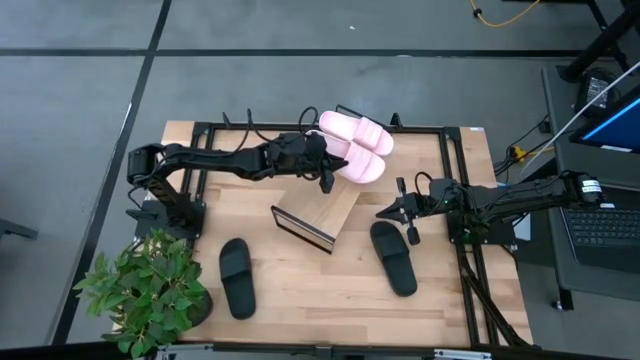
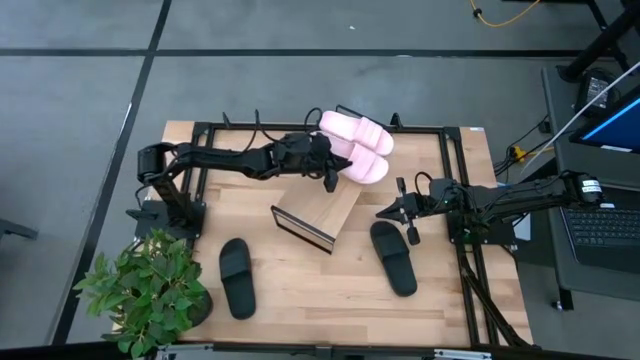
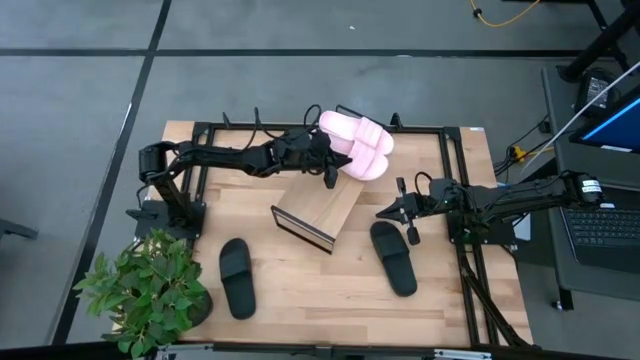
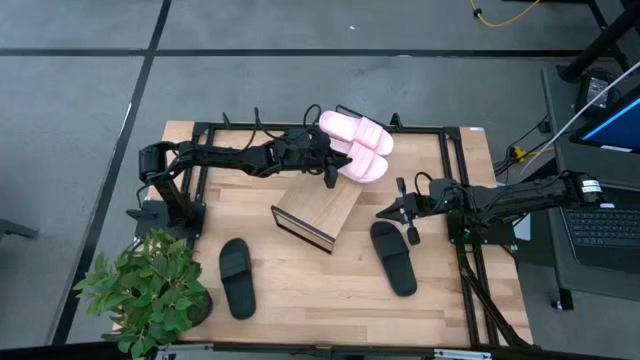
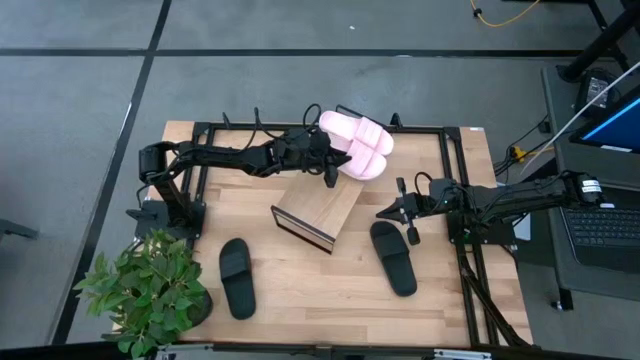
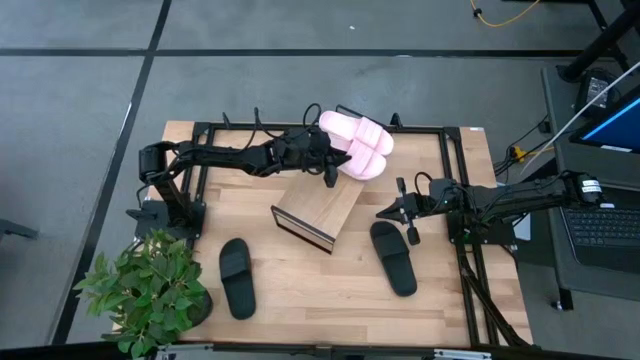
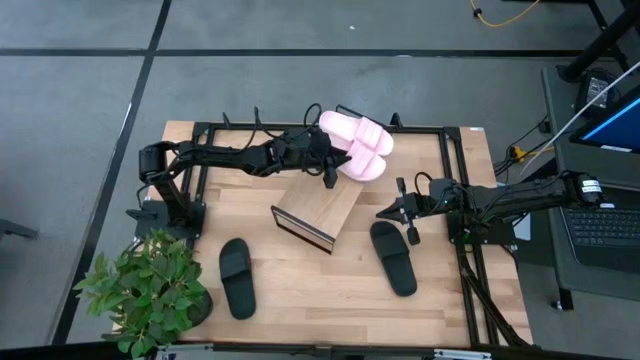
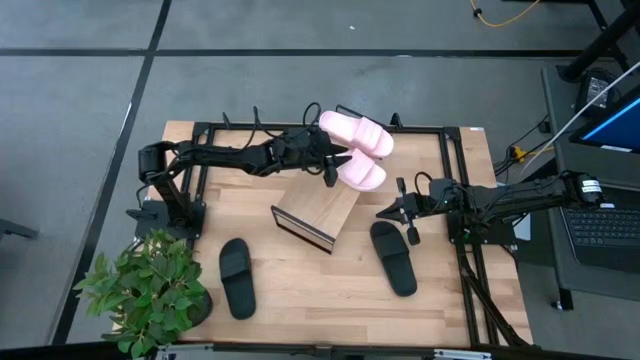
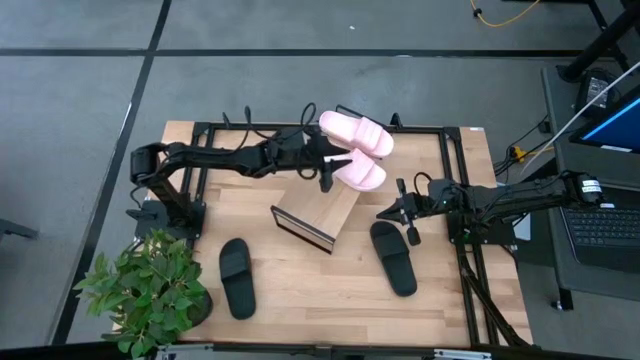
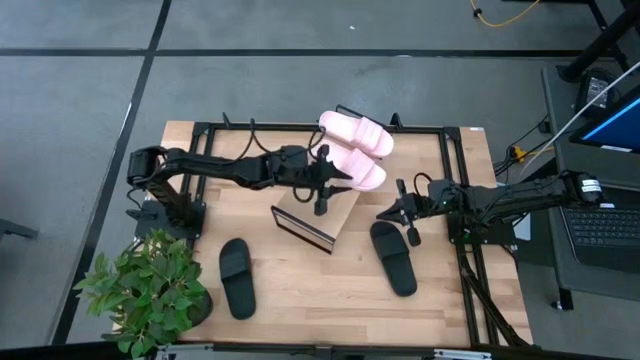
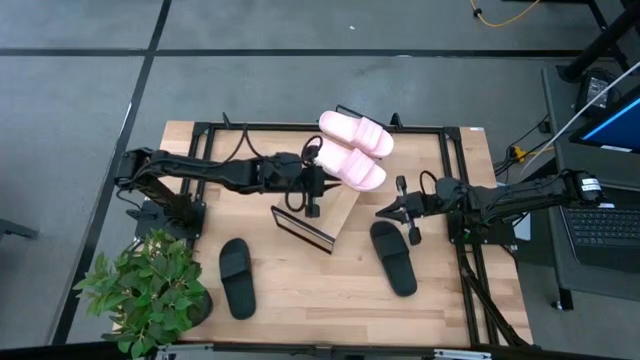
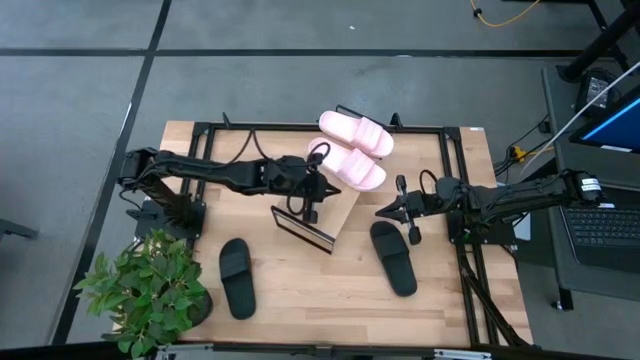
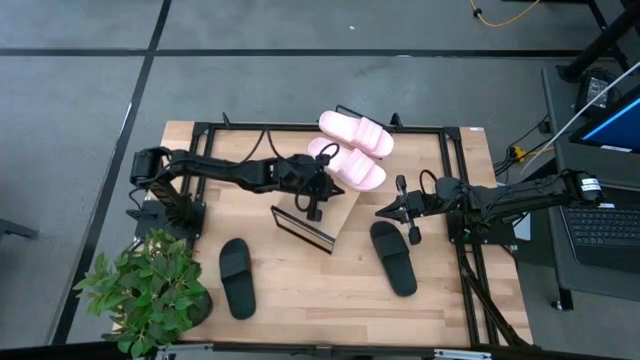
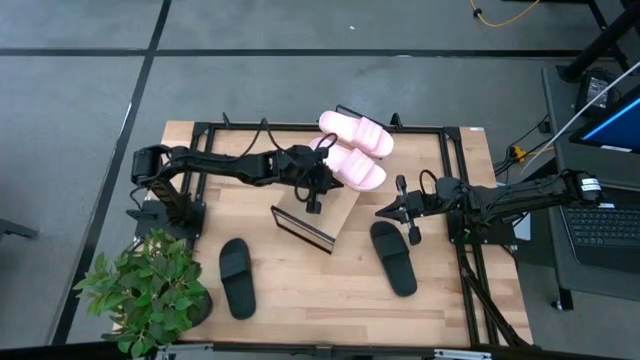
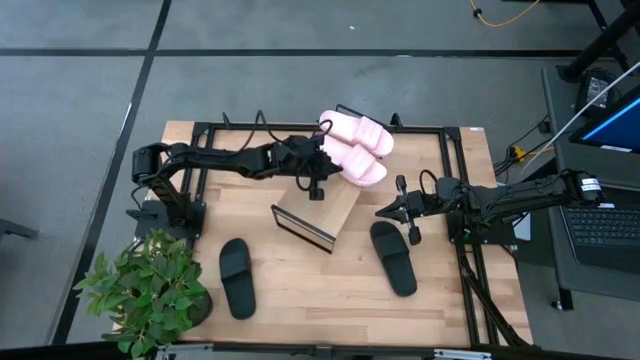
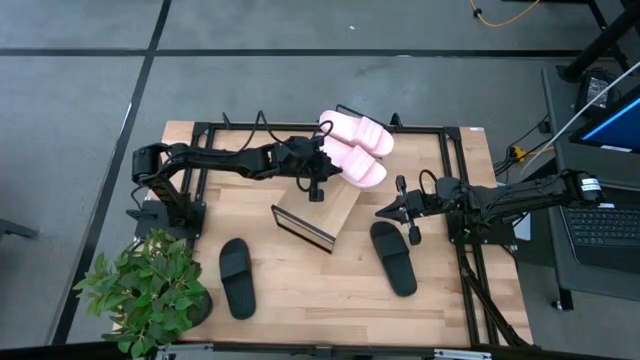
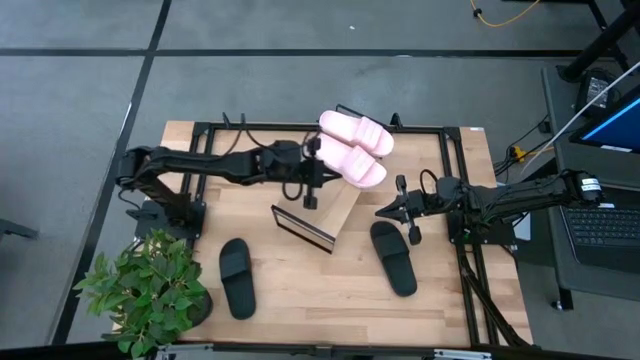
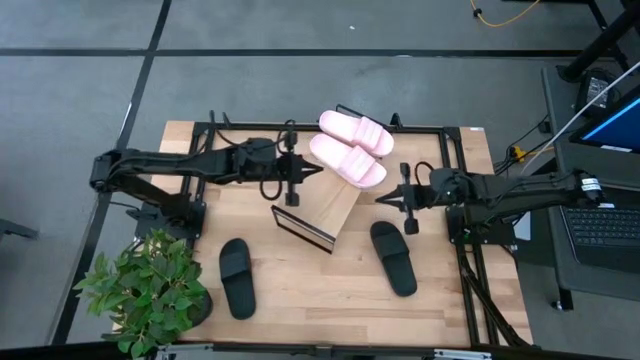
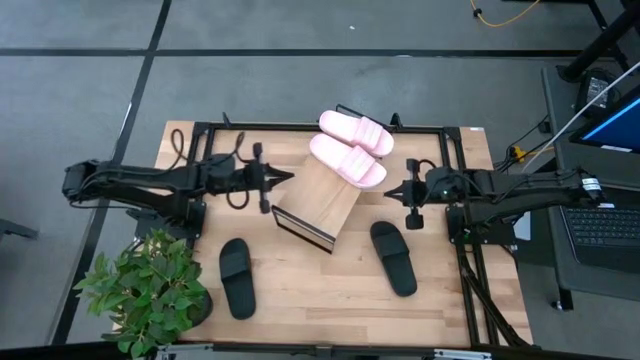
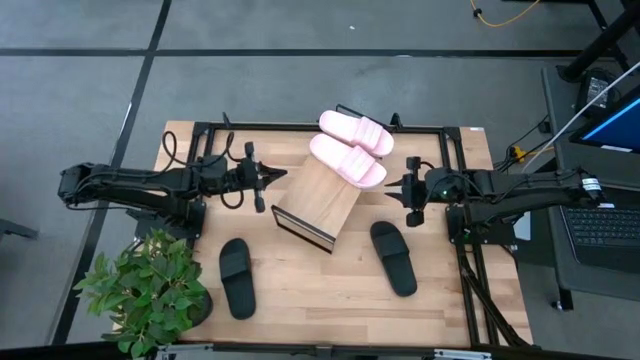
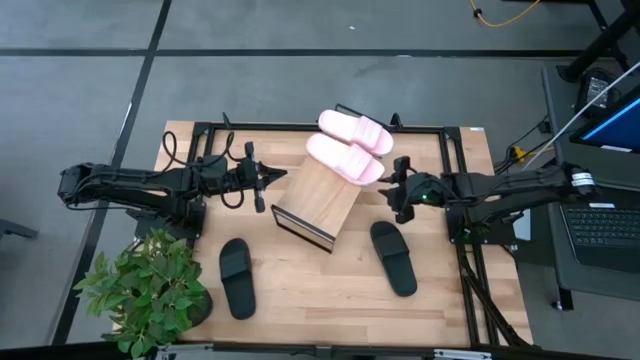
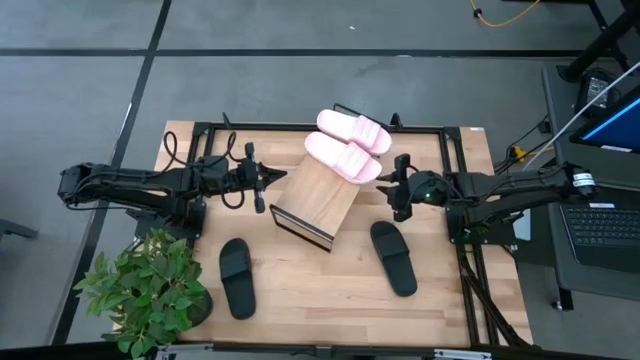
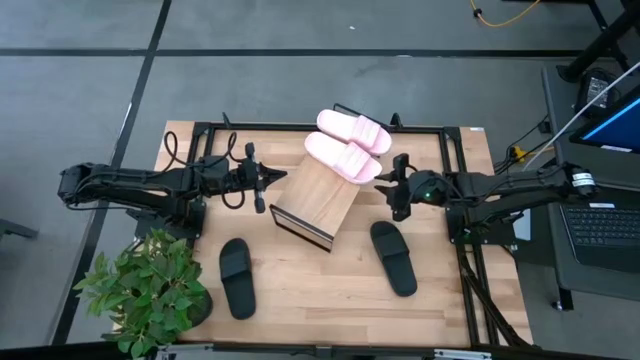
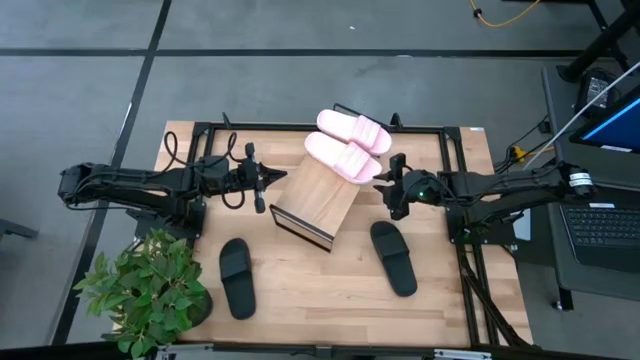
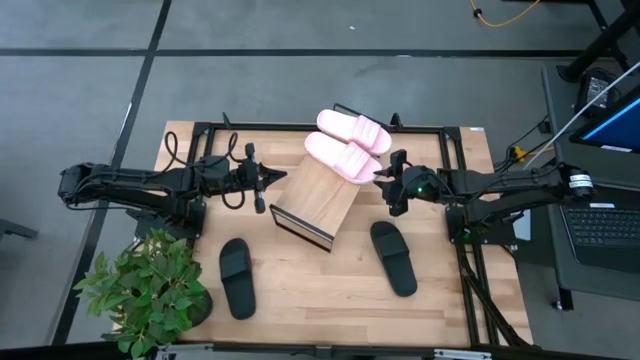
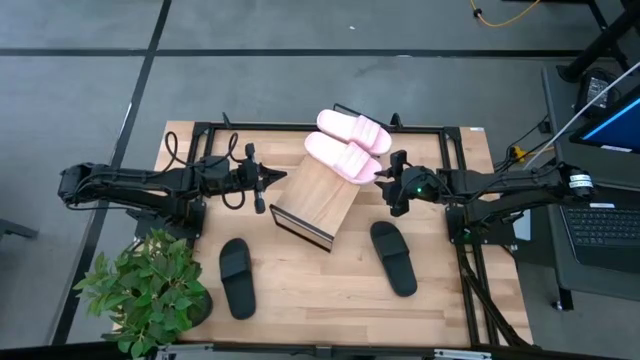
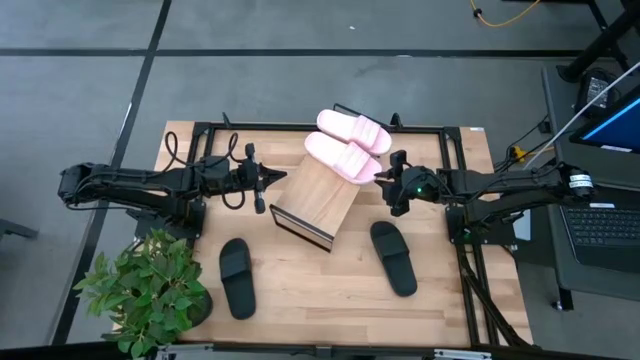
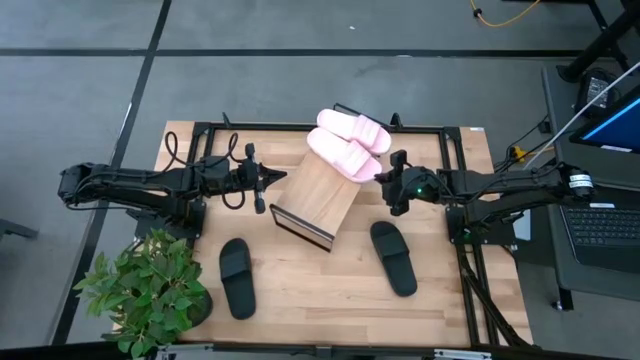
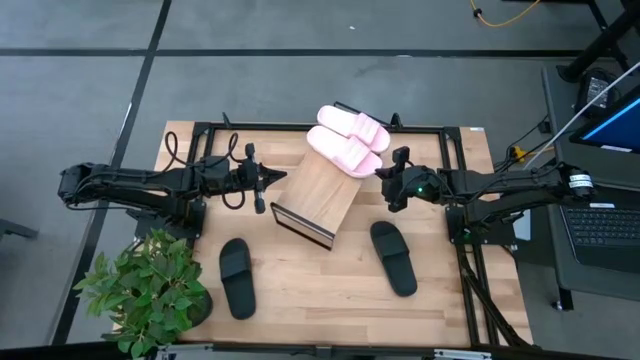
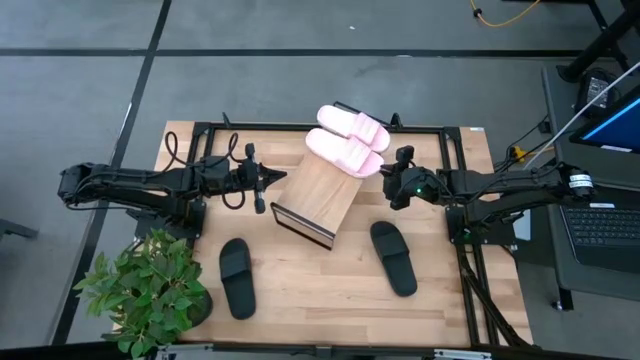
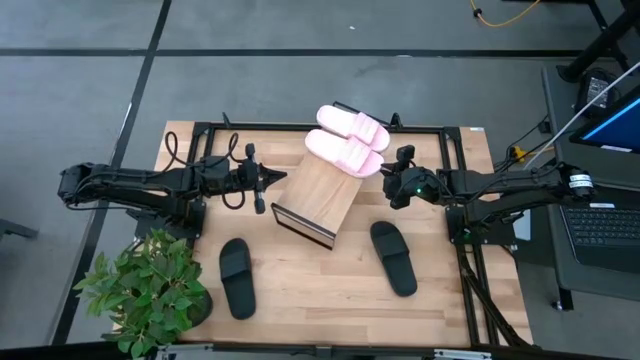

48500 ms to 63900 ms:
Task: Pick and place slides into the shelf
Put the left pink slide on the shelf

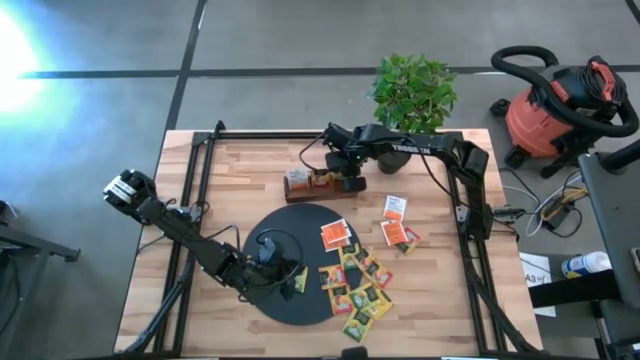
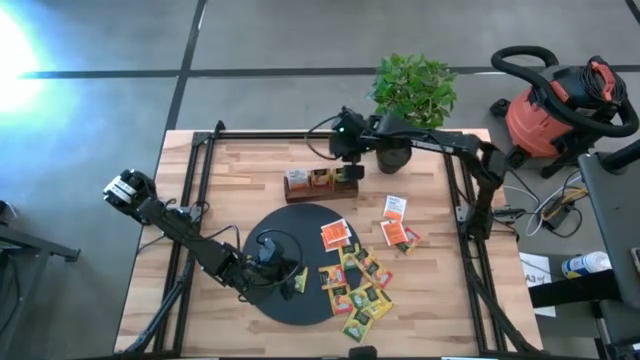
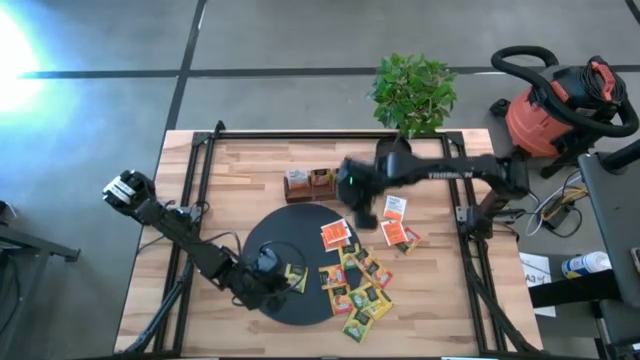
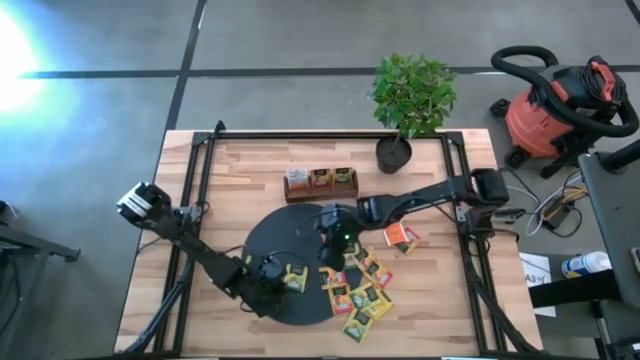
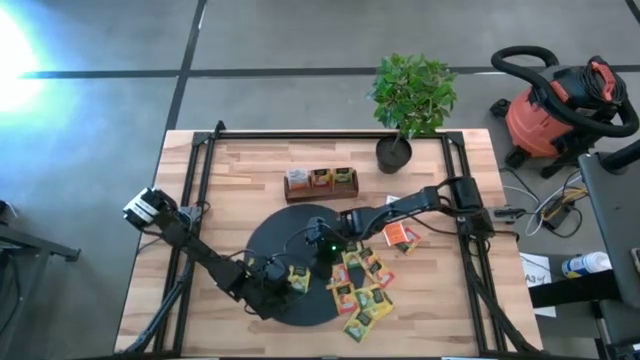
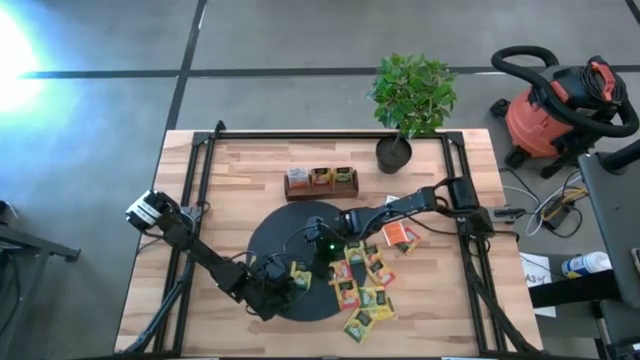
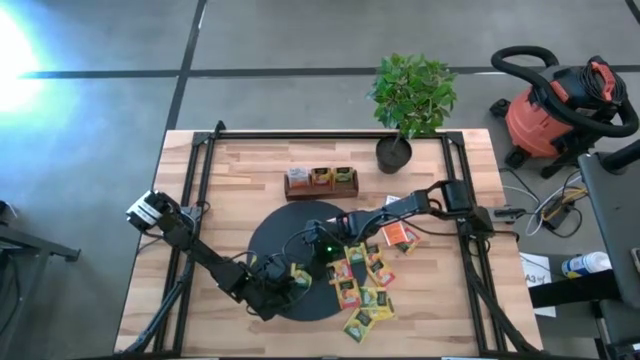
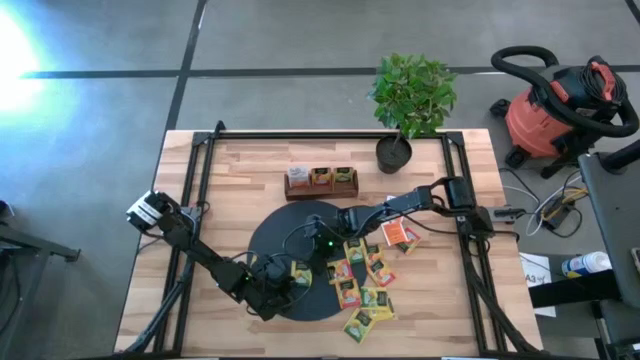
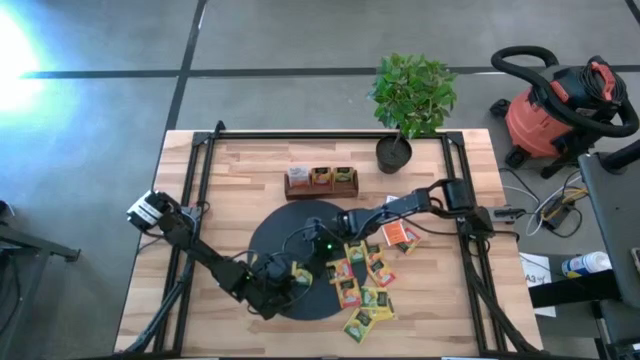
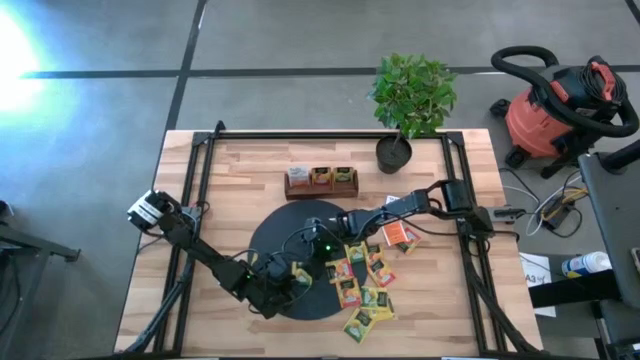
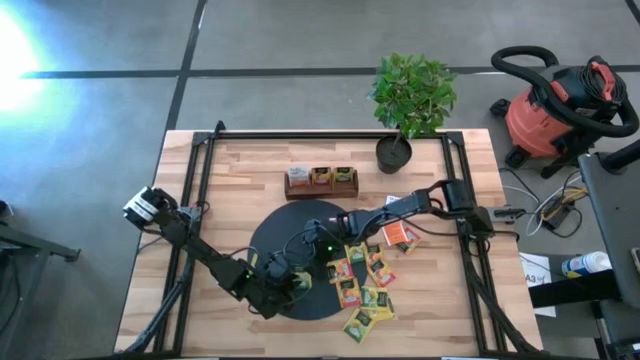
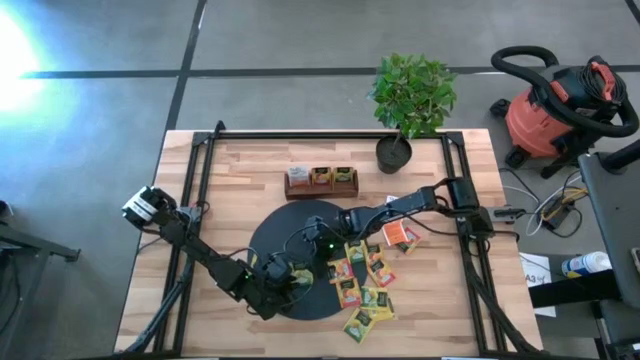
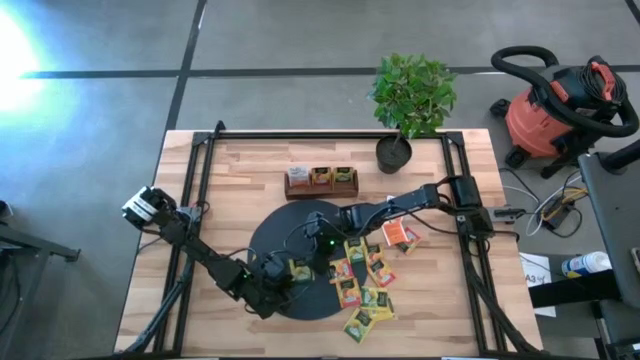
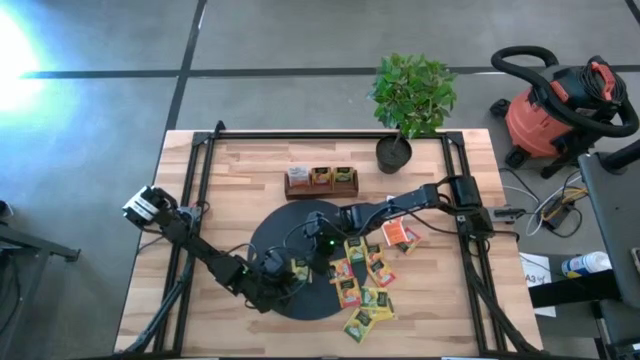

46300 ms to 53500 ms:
Task: Pick & Place Tea
Put the yellow tea bag into the right section of the brown wooden organizer
